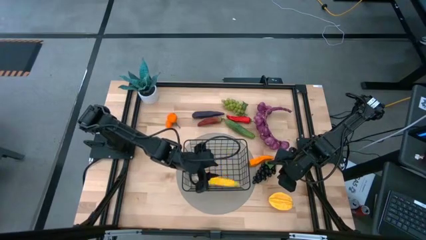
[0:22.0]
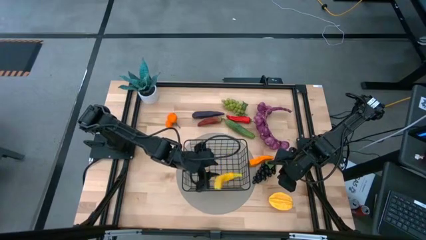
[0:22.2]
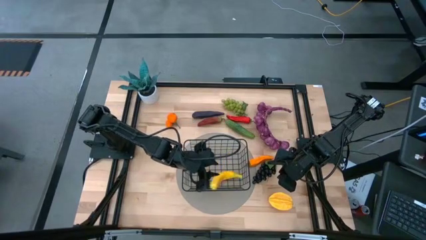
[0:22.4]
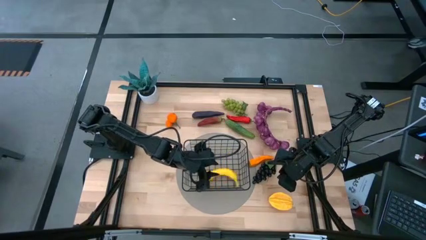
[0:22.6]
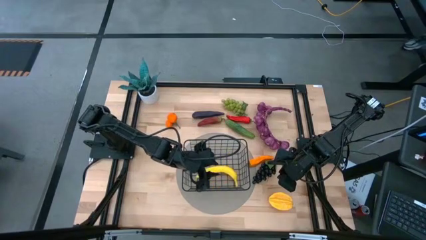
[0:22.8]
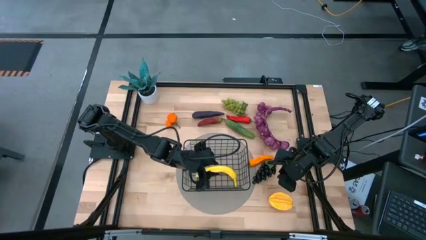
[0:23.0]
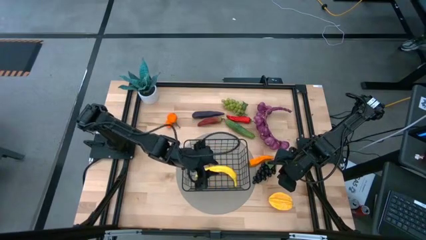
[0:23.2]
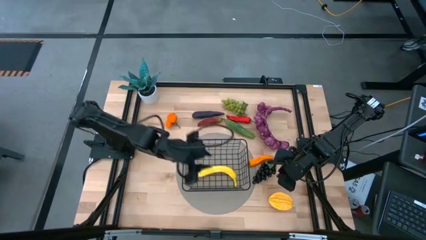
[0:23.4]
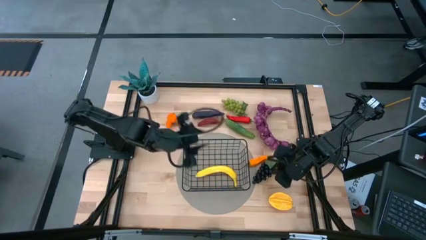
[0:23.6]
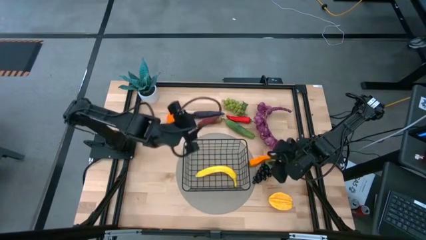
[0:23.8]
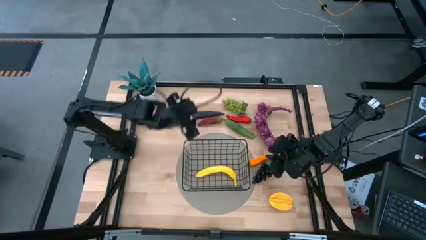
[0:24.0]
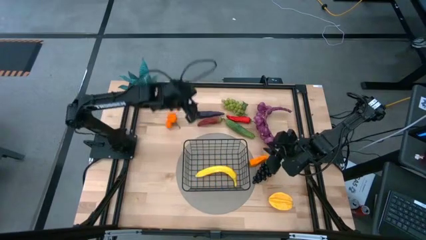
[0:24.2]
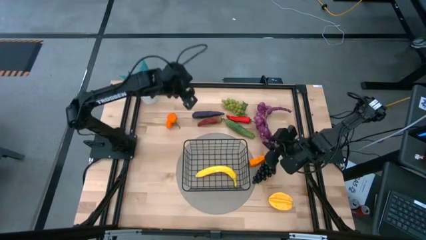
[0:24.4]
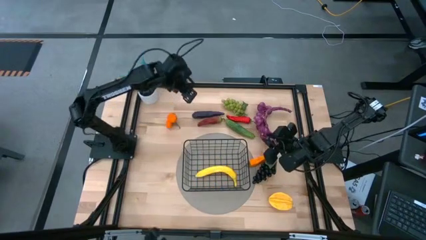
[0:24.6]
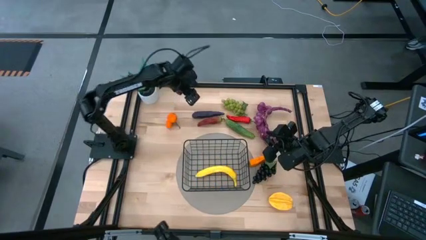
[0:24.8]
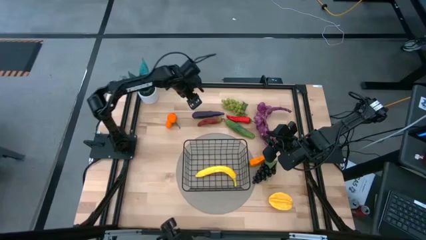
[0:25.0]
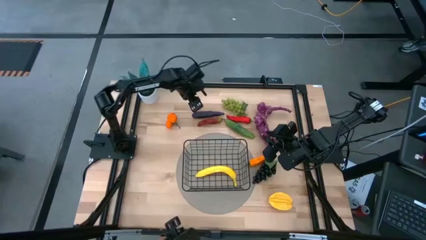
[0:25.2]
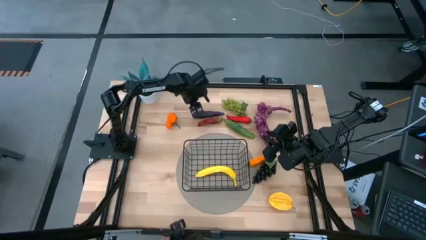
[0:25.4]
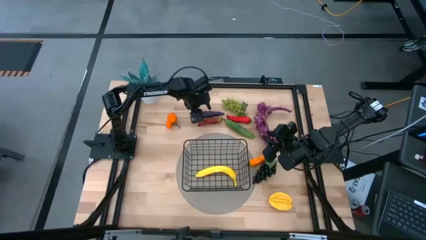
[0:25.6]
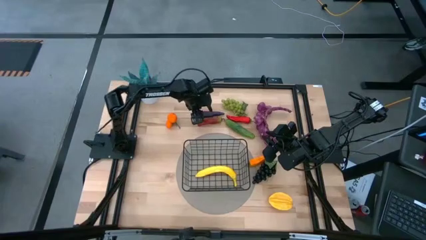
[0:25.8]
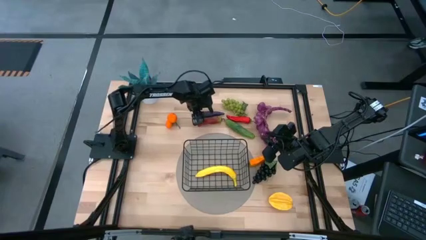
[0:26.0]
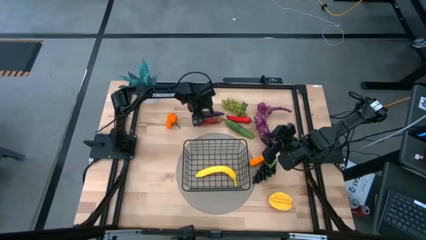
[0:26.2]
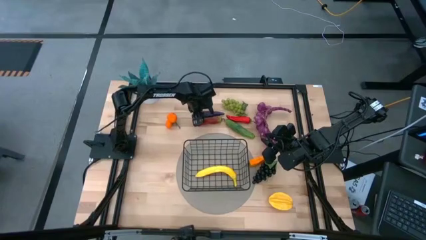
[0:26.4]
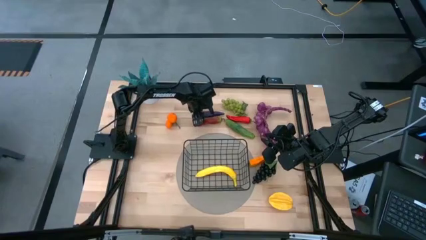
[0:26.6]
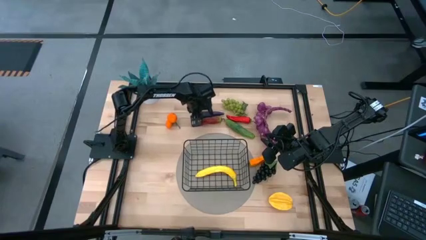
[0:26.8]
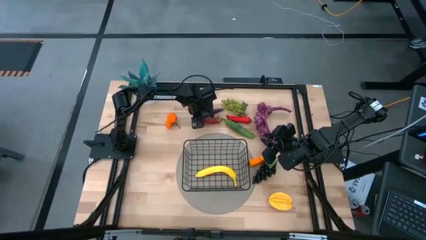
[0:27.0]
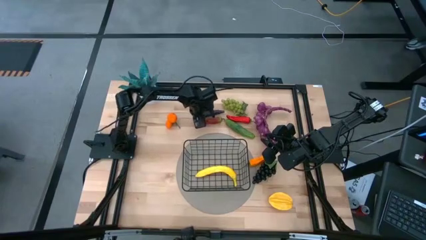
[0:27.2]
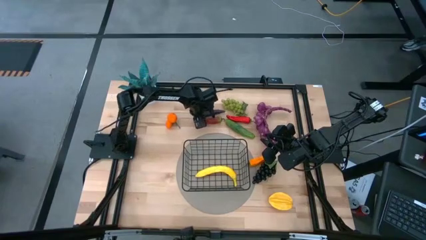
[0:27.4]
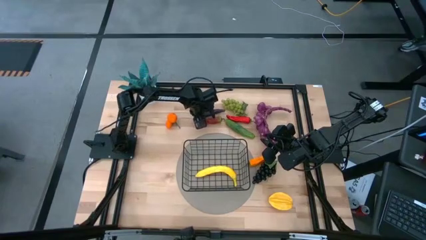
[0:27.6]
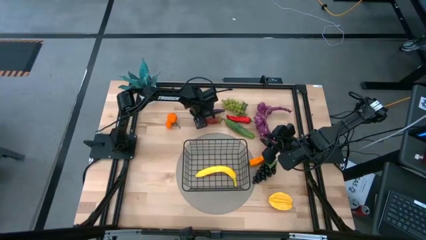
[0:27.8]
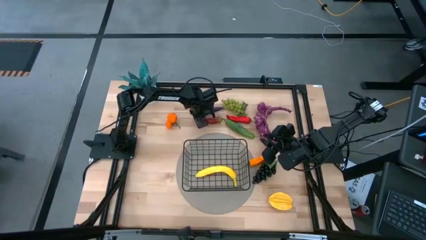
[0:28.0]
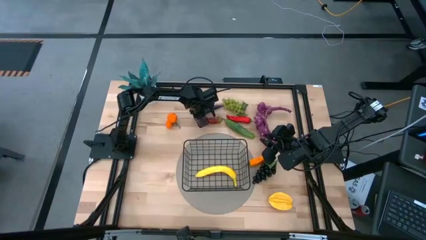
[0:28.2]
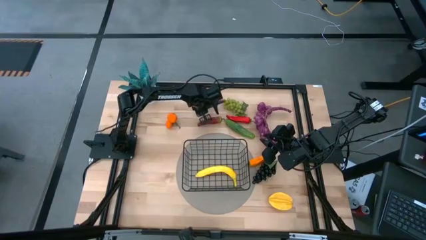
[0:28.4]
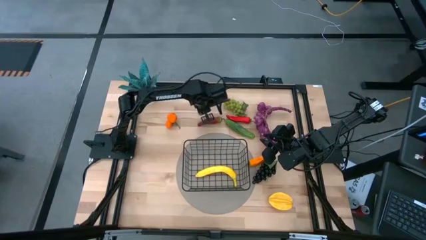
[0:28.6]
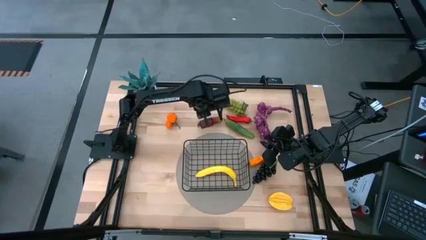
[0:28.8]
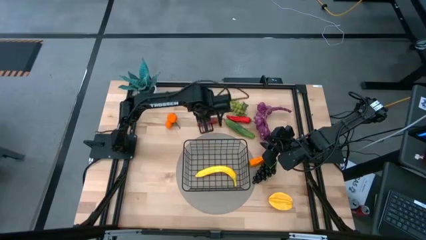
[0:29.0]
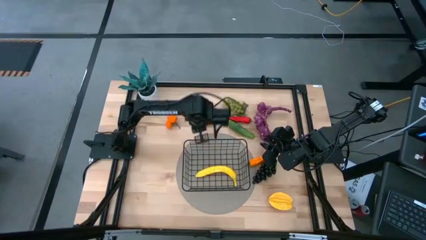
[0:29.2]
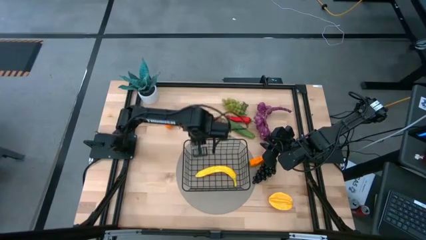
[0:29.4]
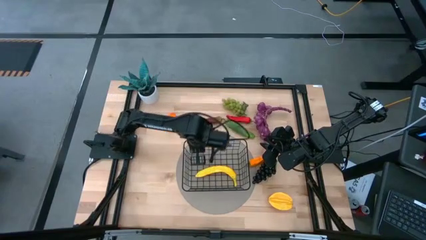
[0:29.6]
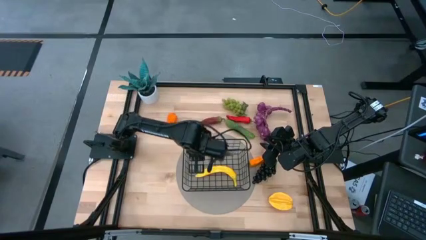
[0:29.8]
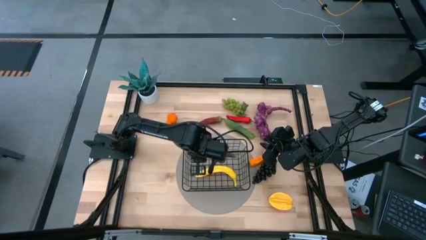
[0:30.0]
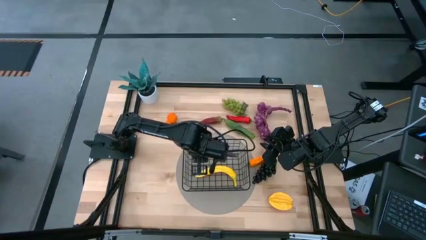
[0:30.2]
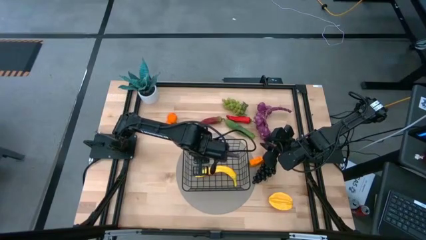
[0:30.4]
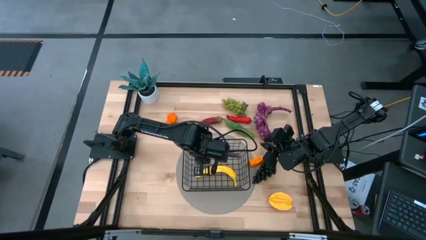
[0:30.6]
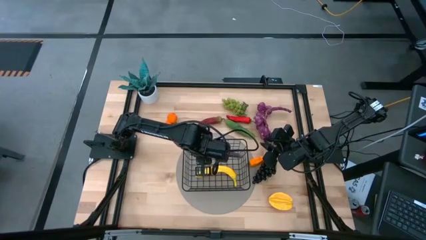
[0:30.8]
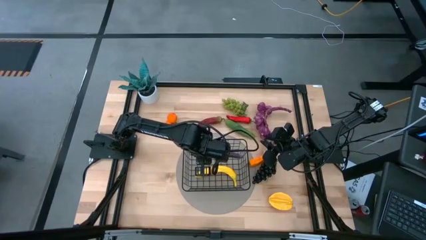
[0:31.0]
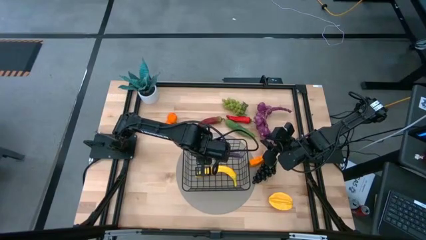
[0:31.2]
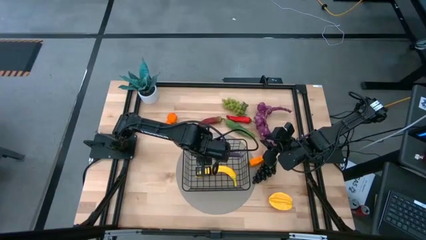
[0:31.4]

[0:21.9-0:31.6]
Task: Build produce basket
Put the purple eggplant into the black wire basket

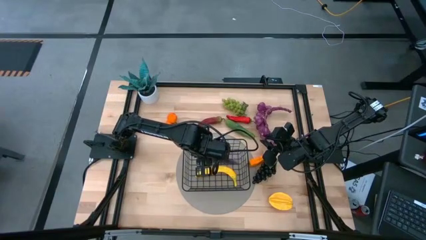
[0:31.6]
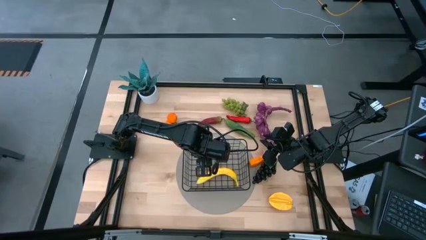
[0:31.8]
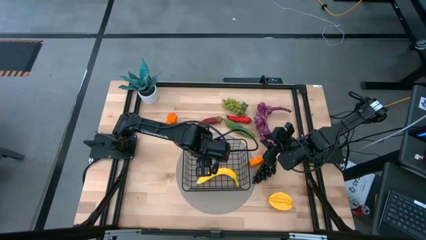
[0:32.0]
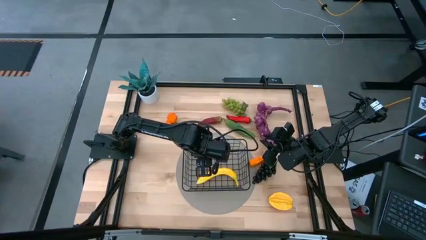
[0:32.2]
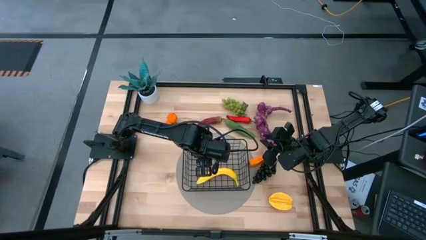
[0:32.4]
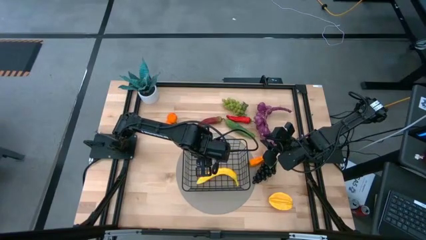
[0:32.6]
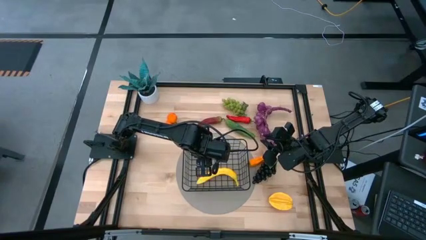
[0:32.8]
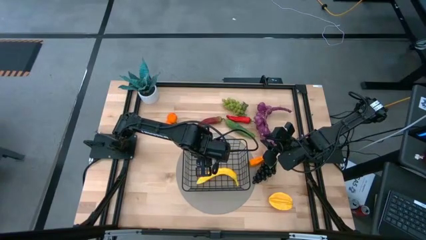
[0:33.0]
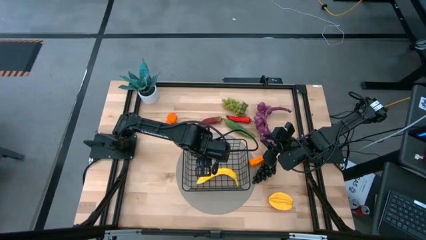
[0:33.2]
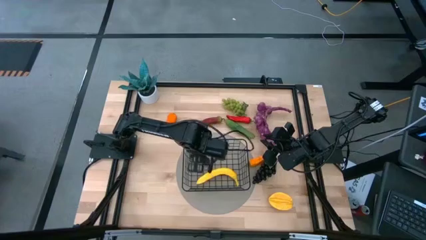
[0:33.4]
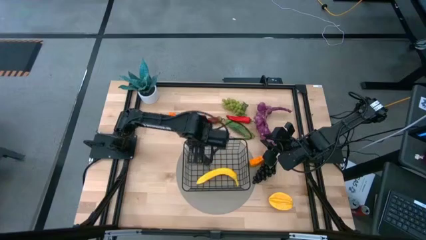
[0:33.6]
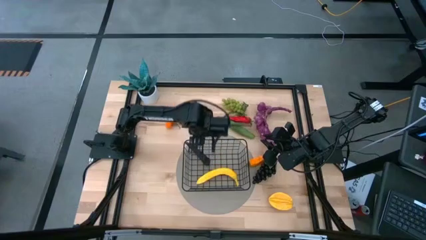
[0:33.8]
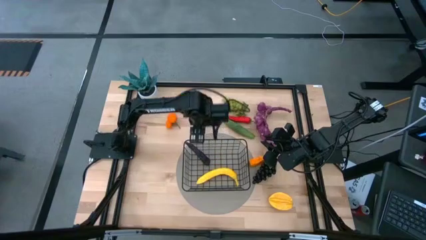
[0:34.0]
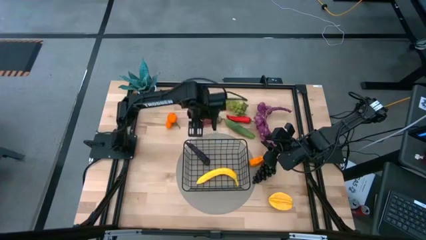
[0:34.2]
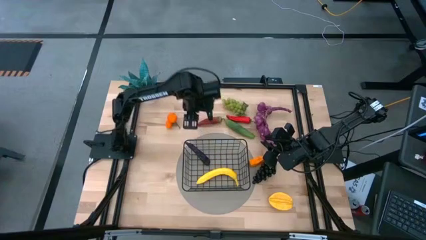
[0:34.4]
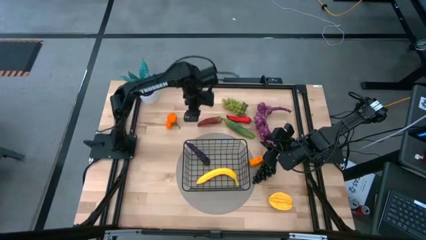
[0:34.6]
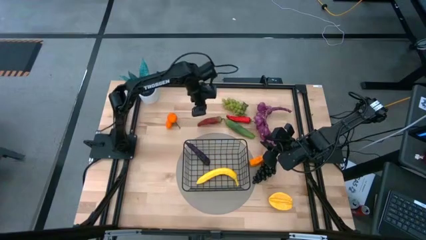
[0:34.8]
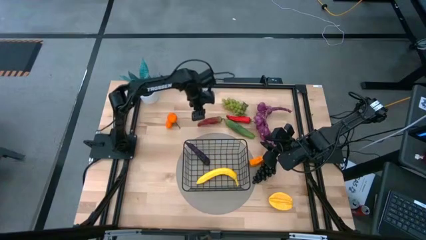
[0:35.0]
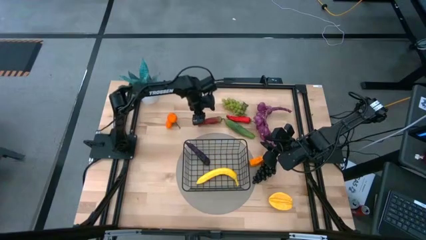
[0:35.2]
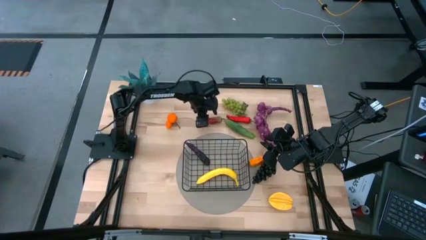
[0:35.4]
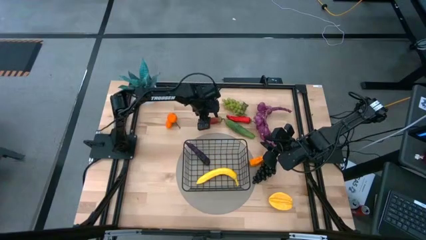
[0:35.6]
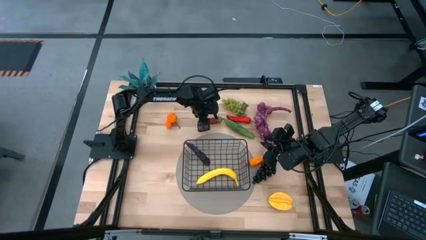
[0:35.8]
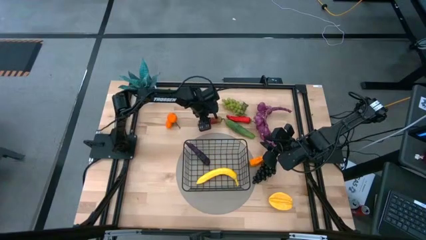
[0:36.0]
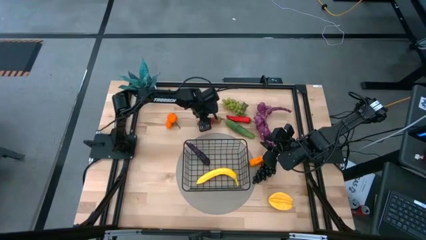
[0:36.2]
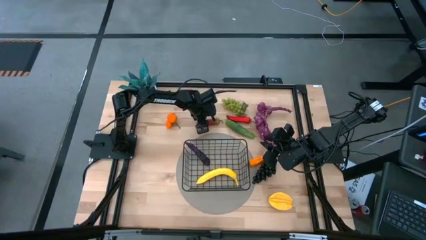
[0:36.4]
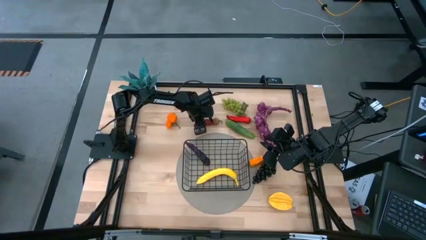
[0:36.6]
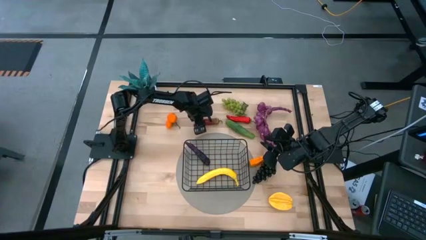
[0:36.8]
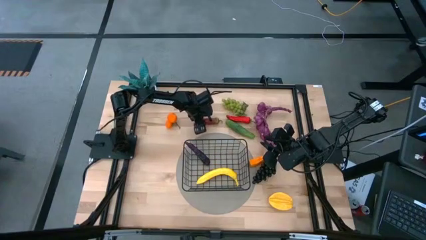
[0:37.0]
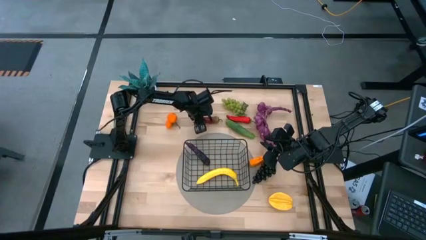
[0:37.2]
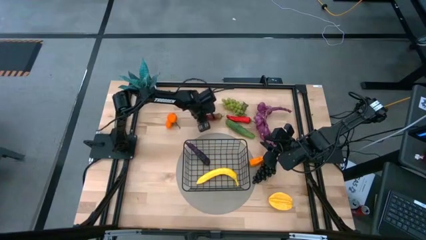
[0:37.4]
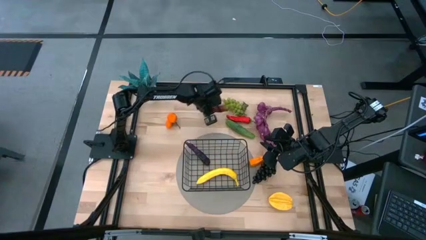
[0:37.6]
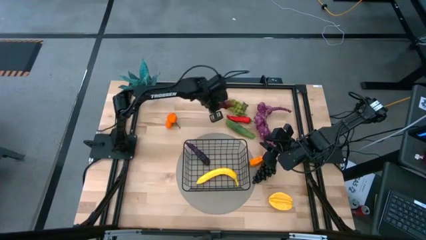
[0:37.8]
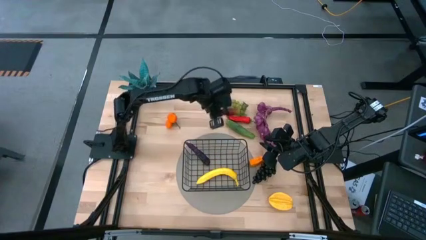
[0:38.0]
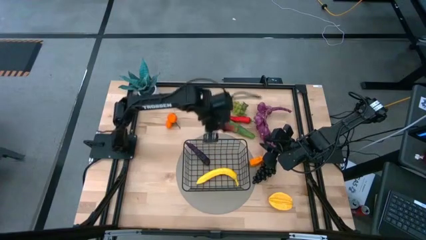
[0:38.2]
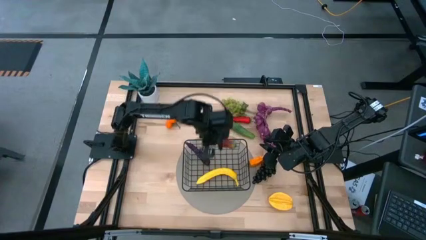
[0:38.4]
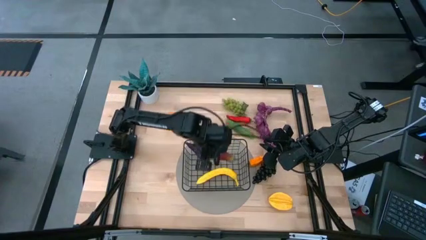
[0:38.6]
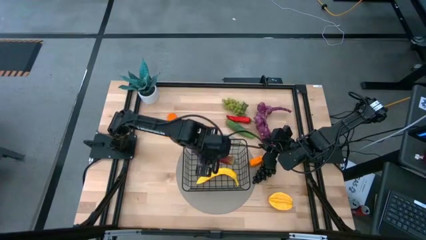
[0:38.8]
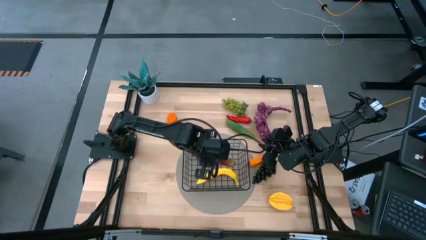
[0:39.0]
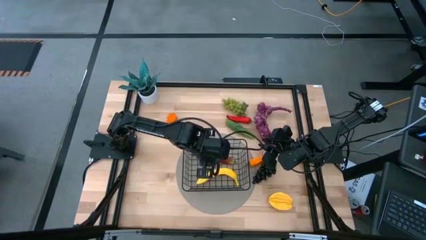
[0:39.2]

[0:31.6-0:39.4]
Put the left red chili pepper into the black wire basket
